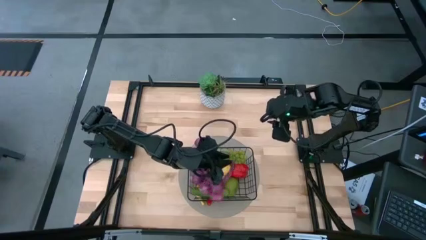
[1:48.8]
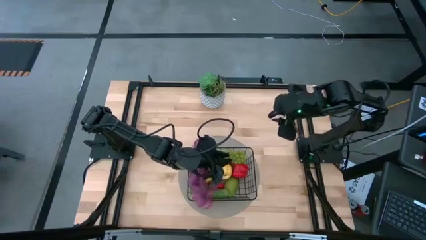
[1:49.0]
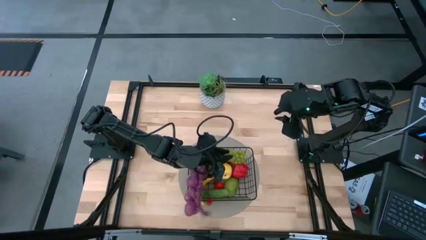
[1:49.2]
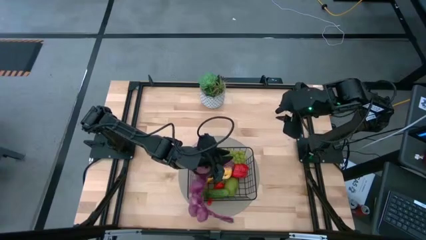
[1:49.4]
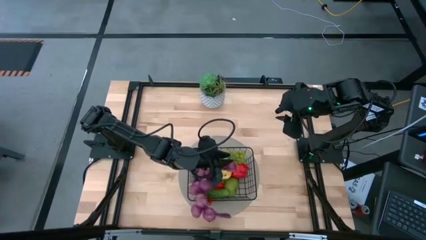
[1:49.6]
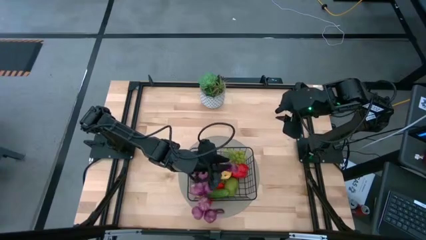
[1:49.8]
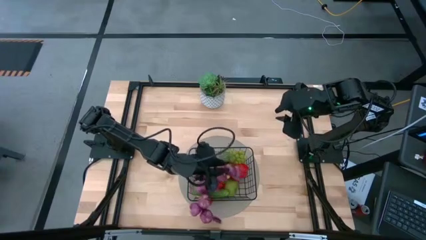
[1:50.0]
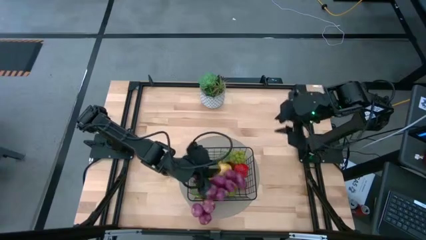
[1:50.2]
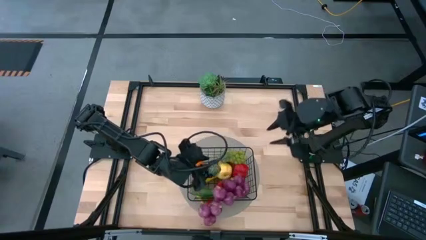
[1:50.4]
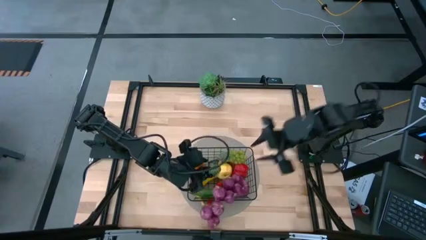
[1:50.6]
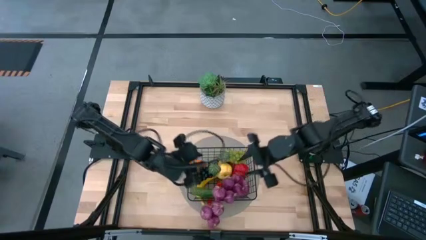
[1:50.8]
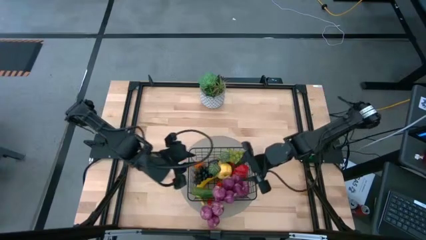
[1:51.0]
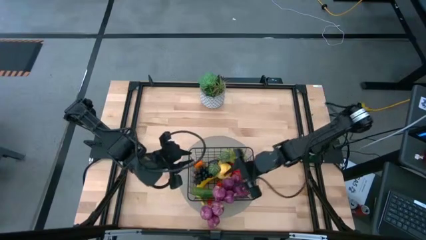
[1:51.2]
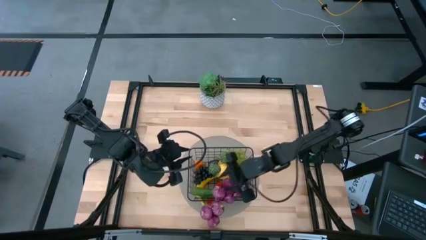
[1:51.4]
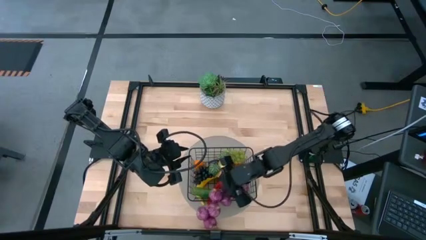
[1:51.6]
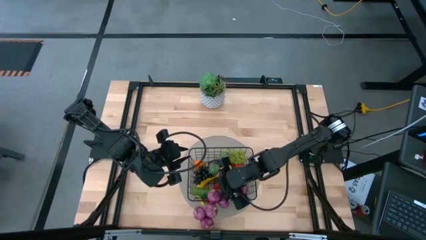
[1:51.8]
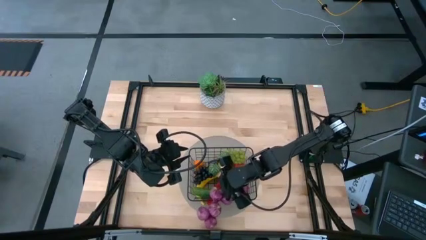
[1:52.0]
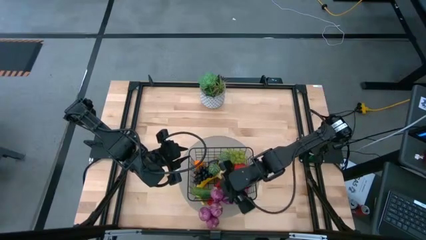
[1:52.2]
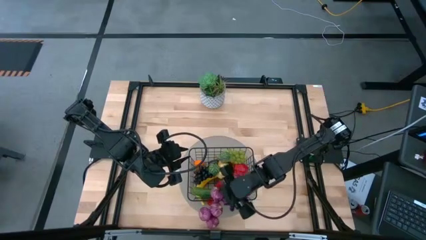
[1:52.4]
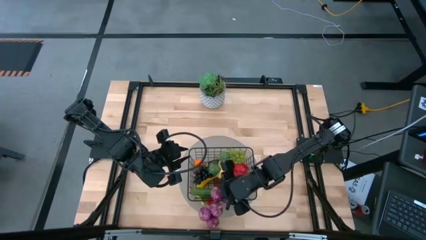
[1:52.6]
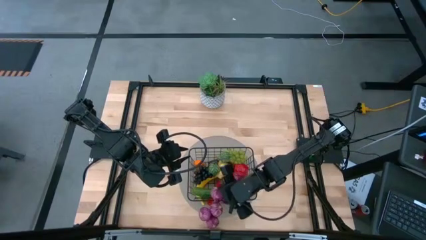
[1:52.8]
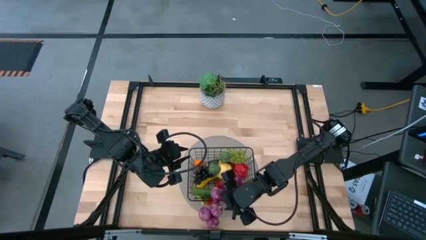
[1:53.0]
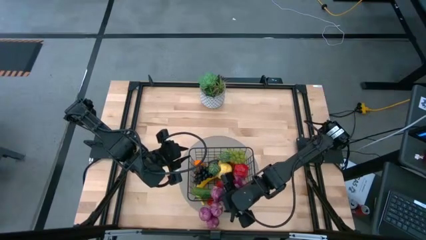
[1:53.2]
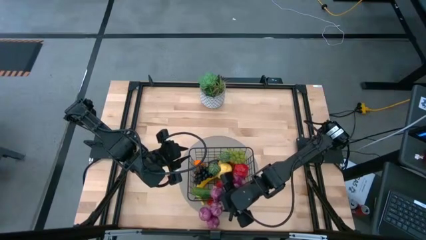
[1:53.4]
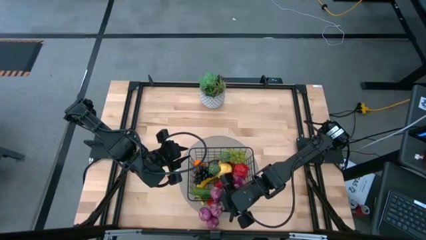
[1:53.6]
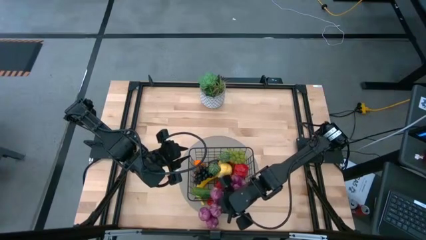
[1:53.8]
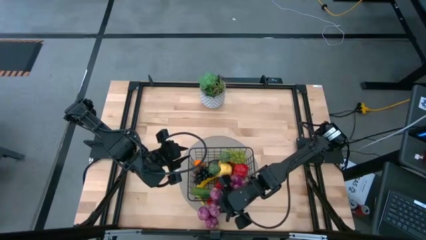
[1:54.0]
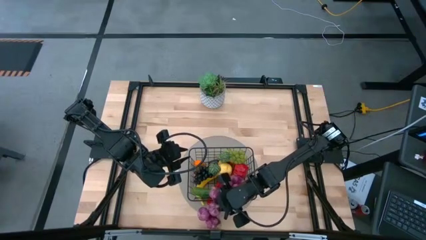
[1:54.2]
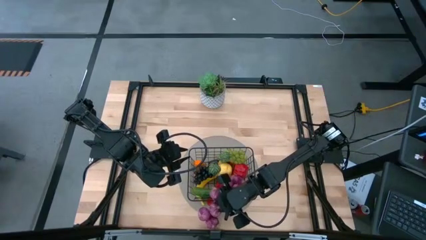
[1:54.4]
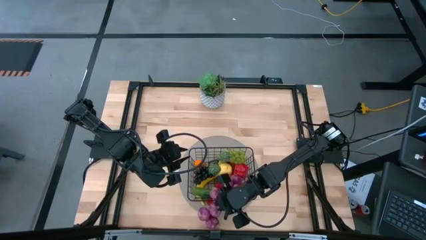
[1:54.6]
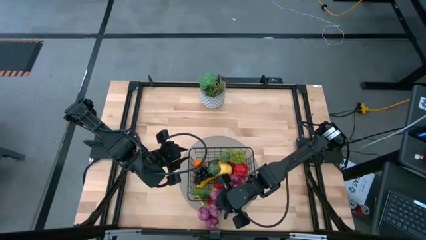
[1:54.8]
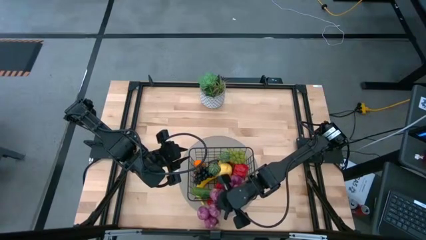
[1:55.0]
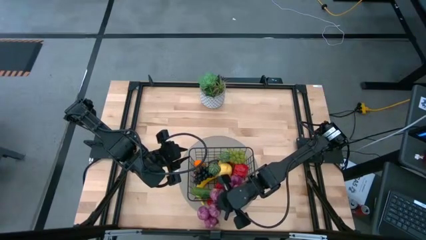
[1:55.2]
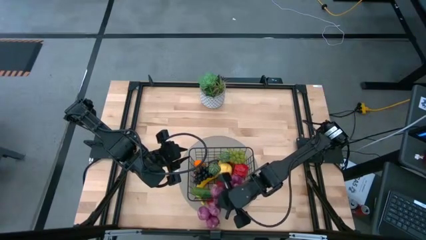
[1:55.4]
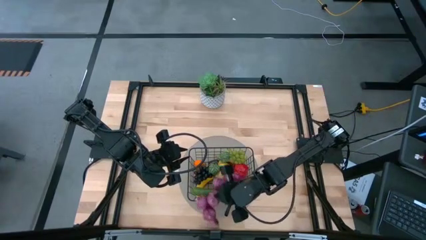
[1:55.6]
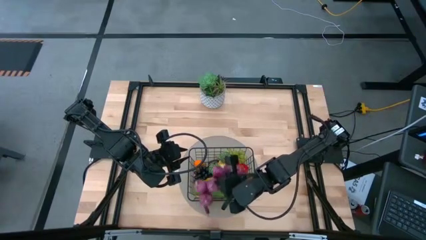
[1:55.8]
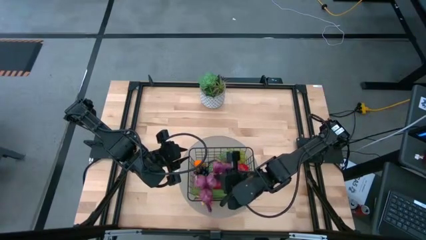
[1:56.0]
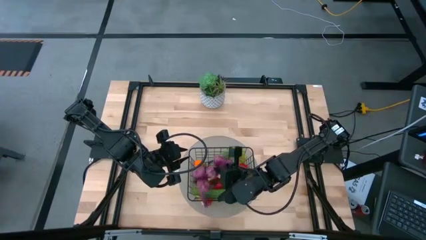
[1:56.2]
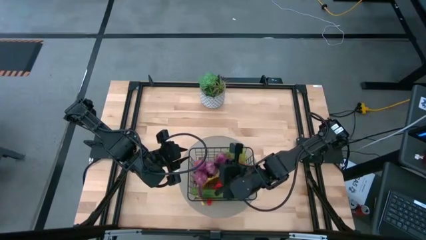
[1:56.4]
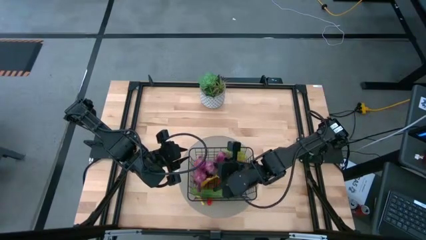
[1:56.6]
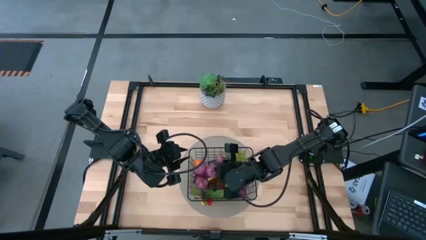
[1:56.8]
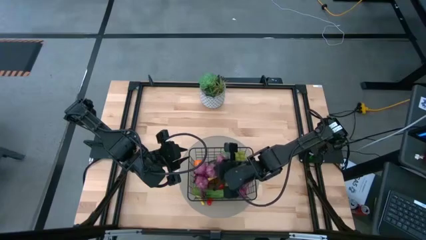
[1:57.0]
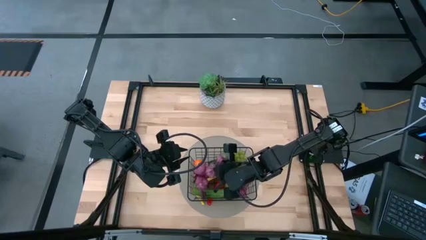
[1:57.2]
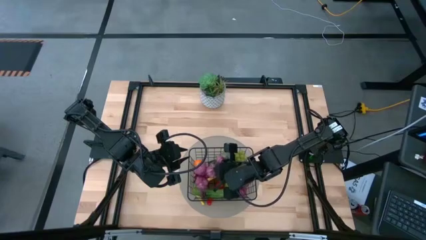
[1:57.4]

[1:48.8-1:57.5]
Task: Build produce basket
Put the purple onions into the black wire basket

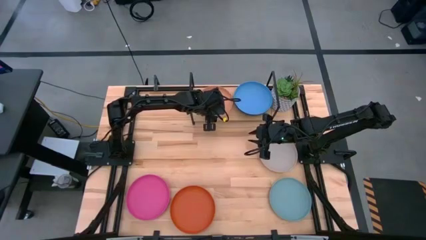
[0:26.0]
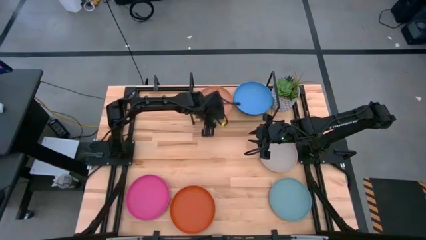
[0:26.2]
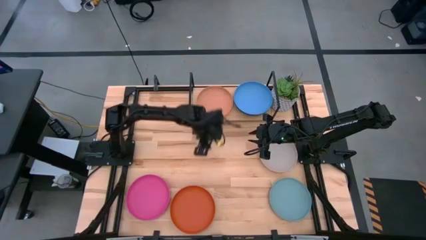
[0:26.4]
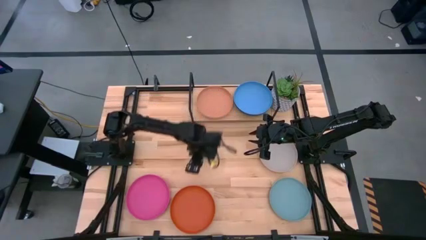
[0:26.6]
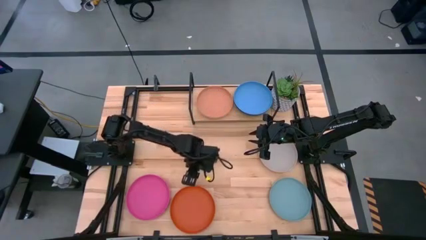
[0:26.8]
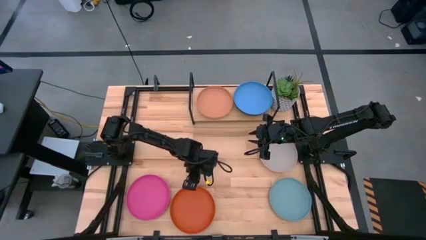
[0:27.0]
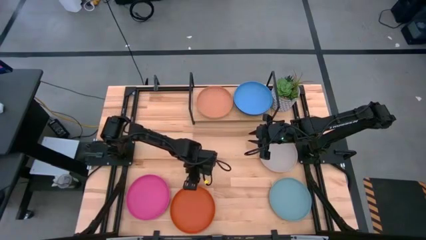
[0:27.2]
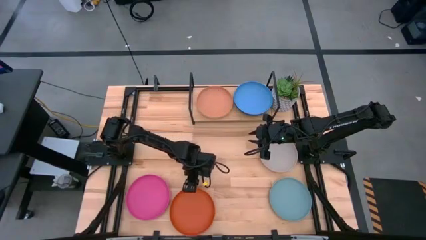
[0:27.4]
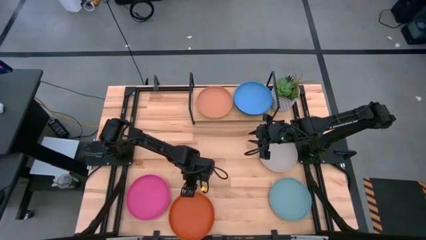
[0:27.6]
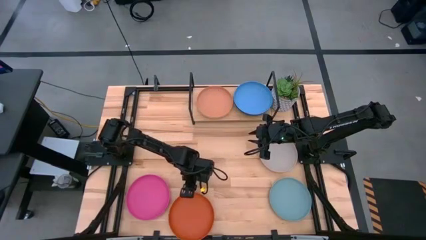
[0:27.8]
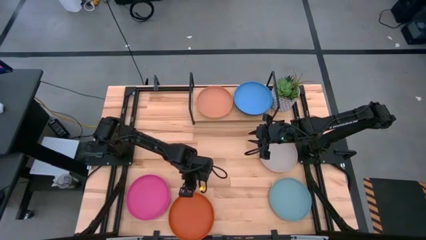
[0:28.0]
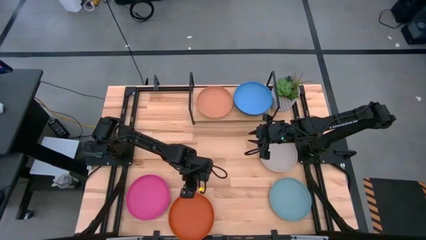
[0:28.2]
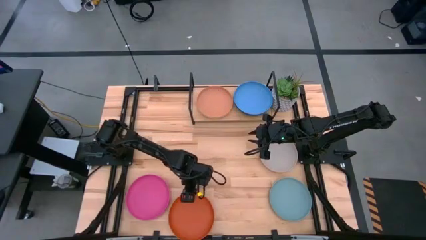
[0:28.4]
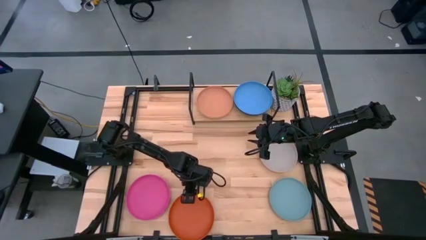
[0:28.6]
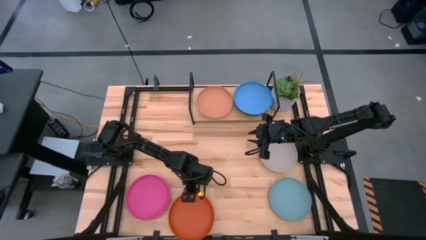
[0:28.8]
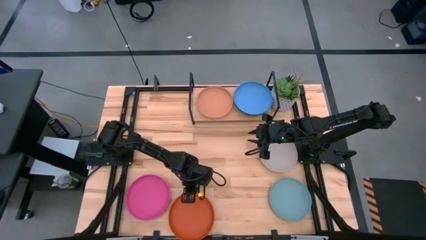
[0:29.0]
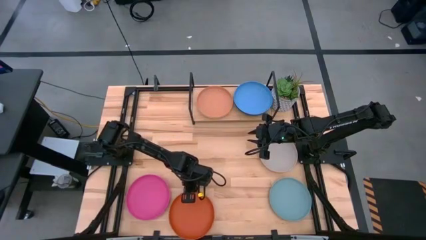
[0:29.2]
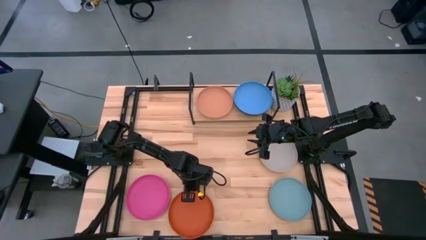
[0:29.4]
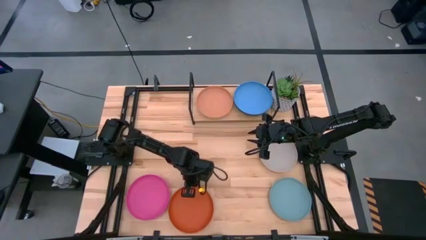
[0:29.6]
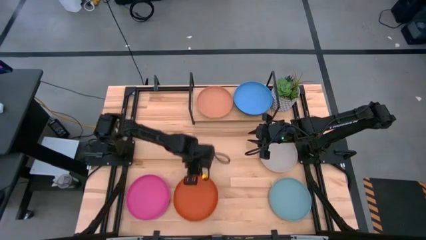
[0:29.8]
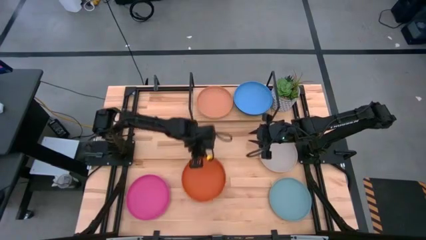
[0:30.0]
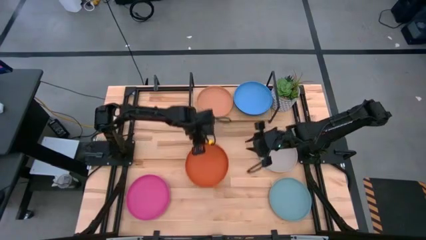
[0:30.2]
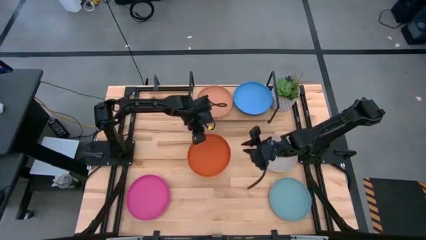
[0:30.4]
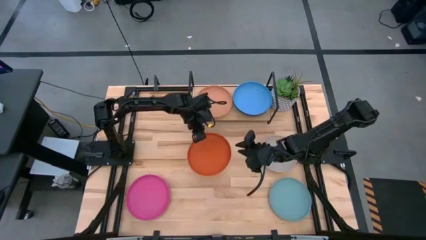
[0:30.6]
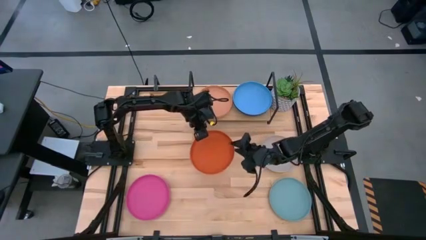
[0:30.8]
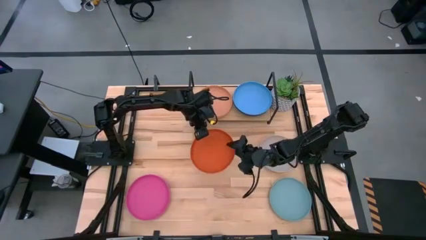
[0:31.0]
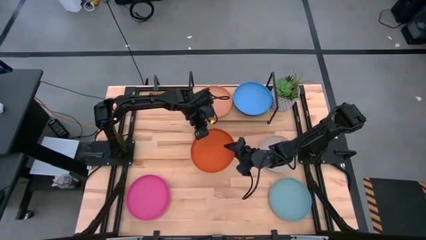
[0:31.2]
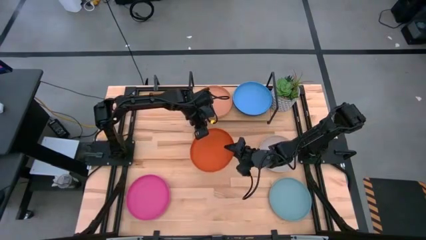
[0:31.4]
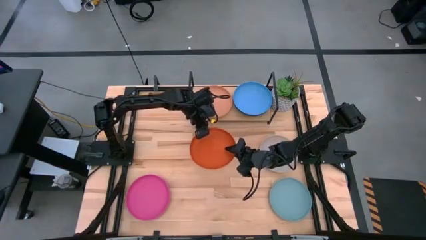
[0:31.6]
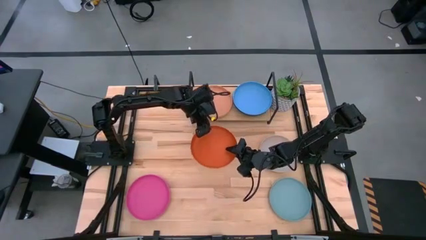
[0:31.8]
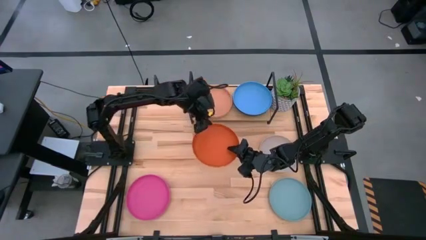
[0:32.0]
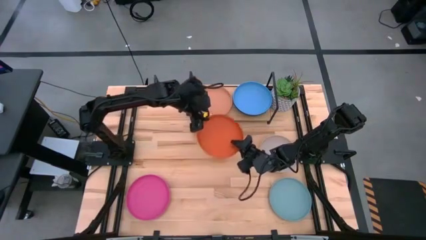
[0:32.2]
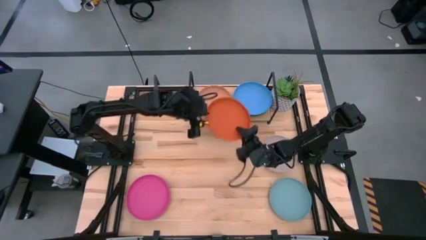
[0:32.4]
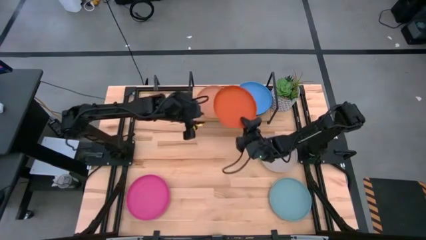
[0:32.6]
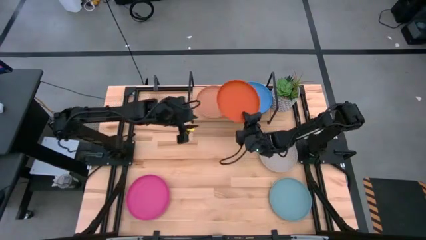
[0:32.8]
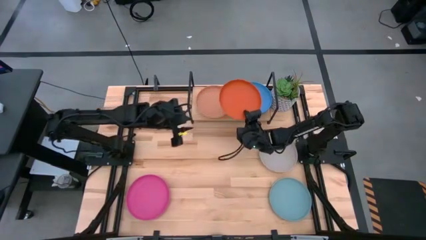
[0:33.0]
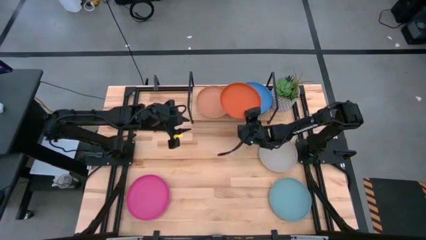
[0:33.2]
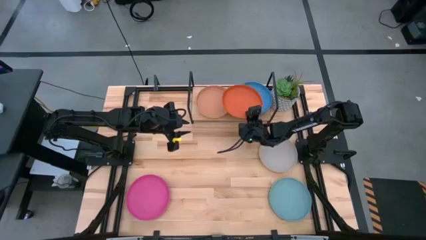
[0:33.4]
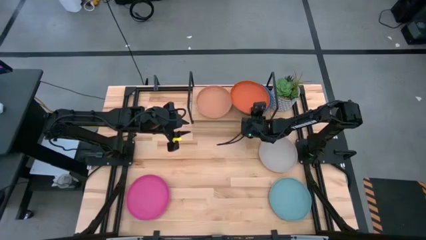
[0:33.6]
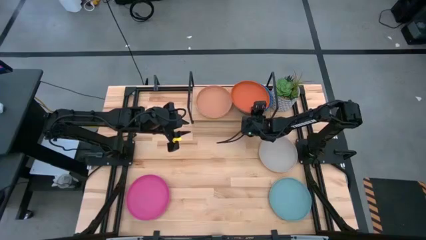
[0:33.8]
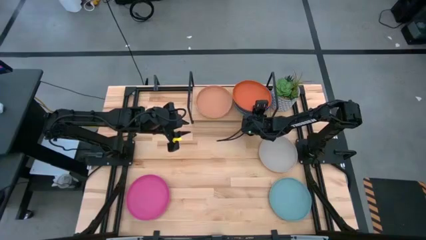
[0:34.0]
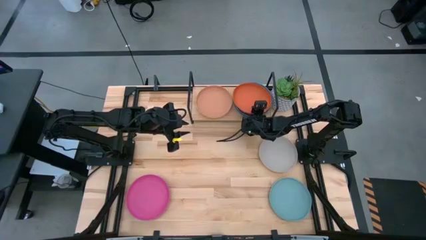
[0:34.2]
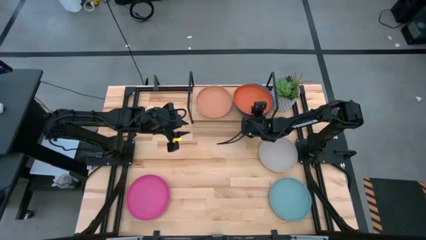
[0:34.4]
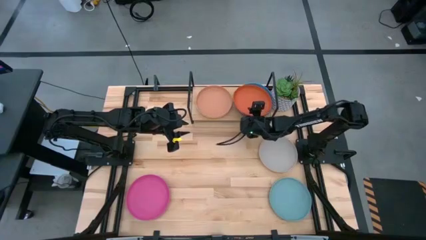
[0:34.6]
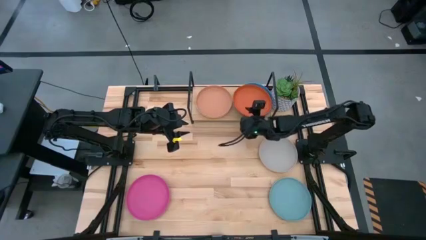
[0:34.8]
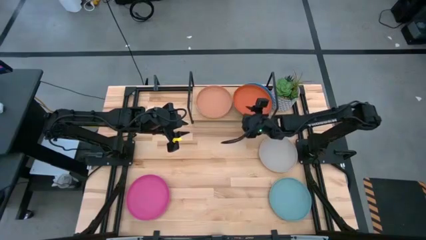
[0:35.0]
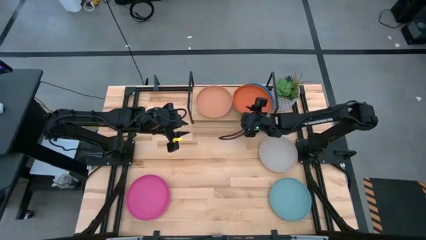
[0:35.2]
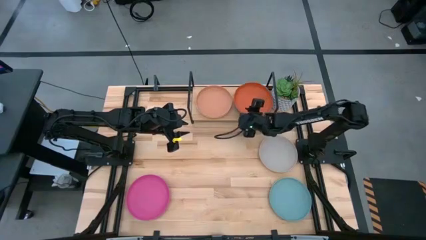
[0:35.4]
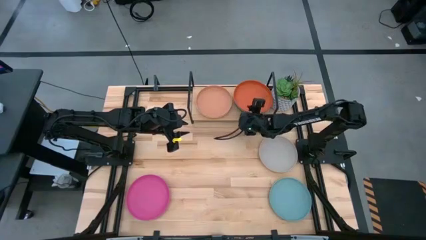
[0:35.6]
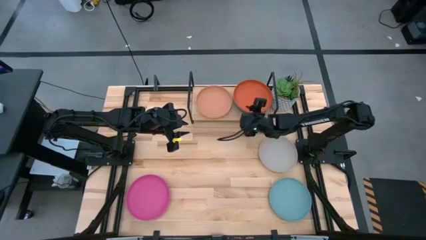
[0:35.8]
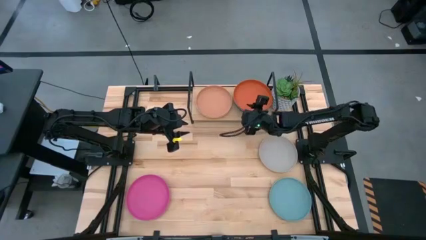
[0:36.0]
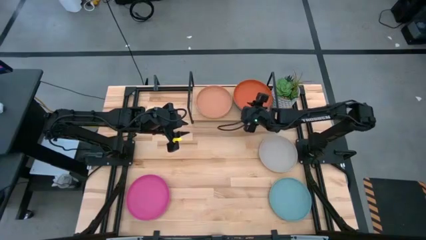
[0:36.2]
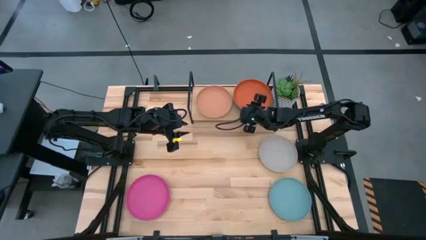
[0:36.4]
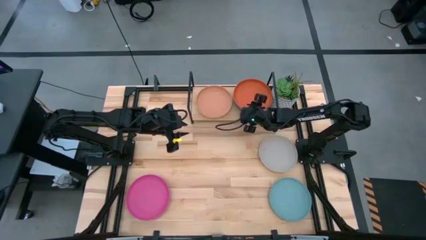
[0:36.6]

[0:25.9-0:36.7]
Task: Place and stack plates onto a shelf
Stack the orange plate on top of the blue plate on the shelf
